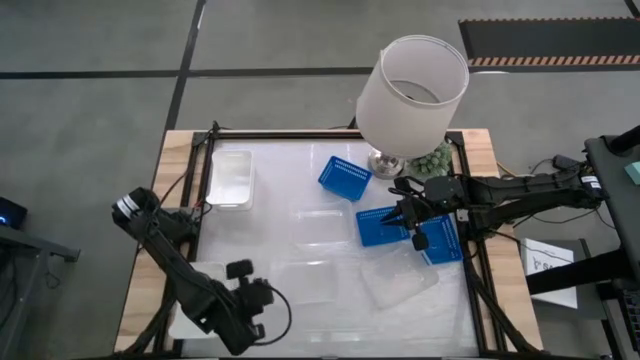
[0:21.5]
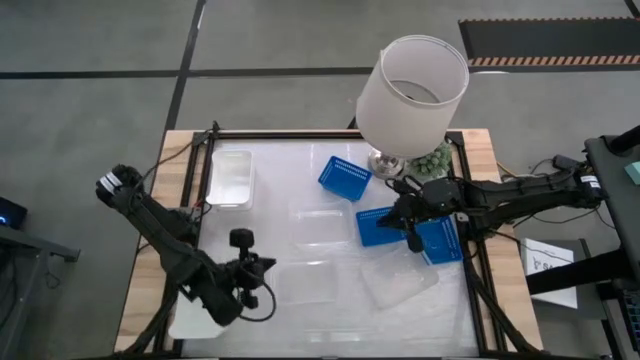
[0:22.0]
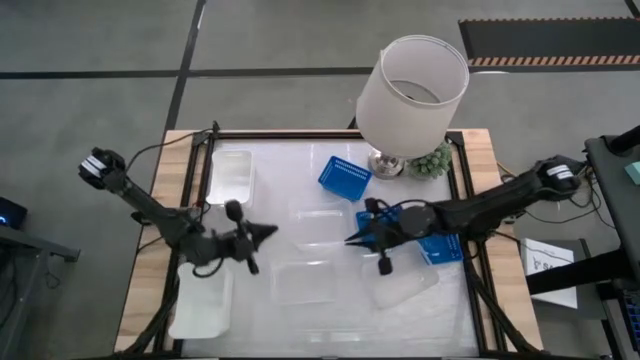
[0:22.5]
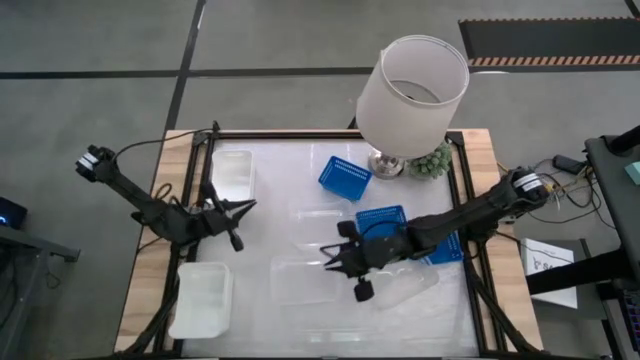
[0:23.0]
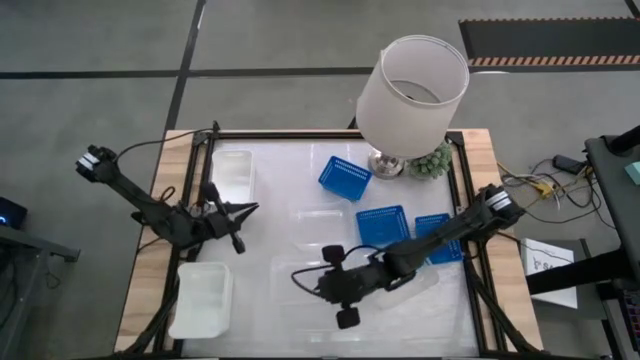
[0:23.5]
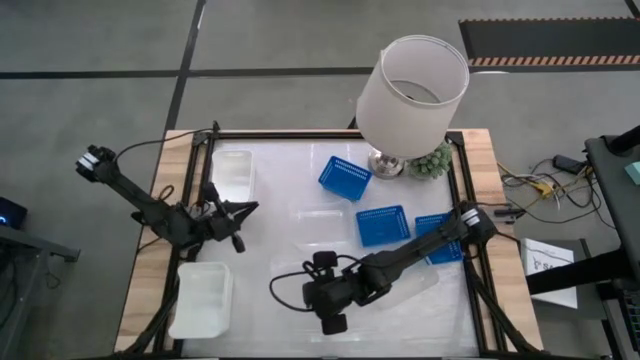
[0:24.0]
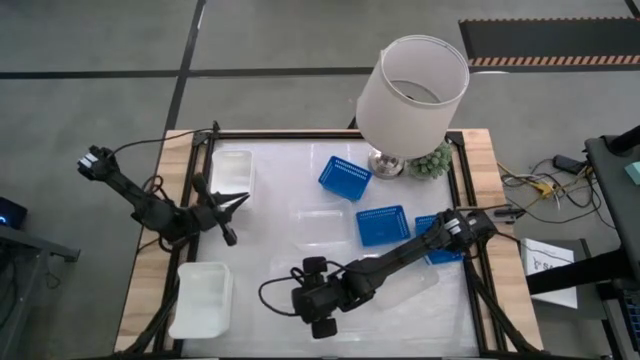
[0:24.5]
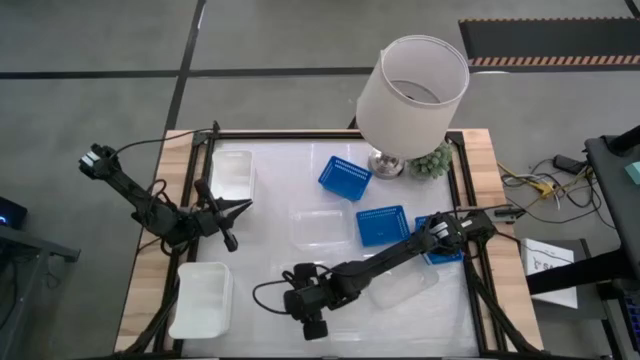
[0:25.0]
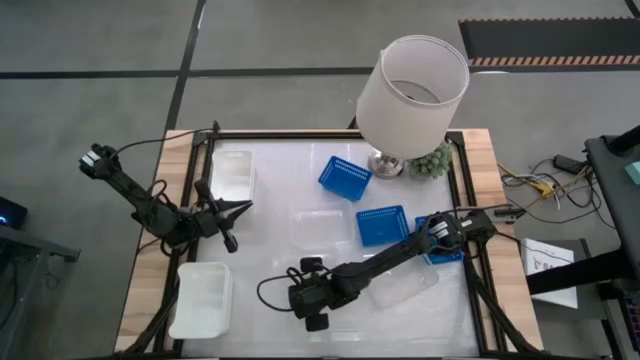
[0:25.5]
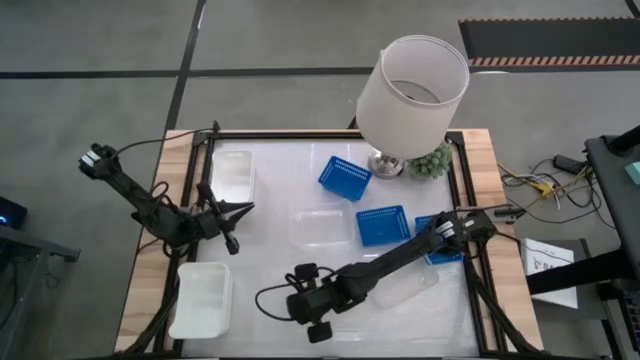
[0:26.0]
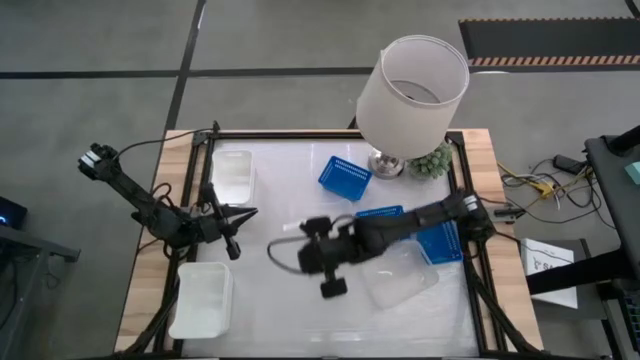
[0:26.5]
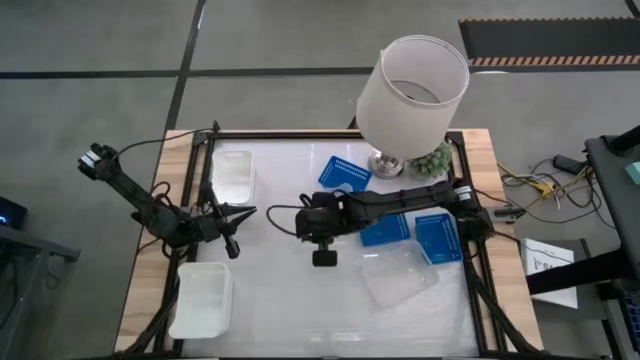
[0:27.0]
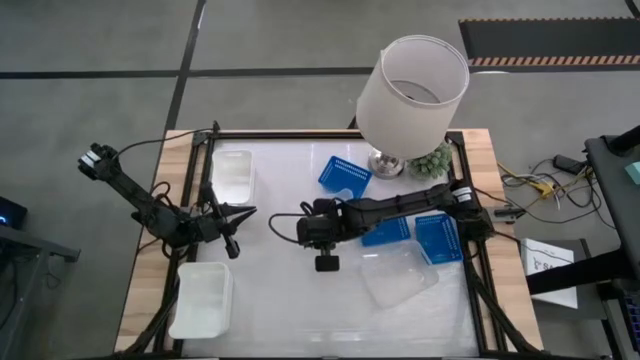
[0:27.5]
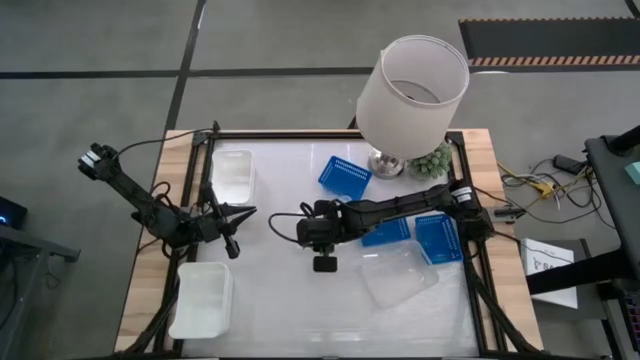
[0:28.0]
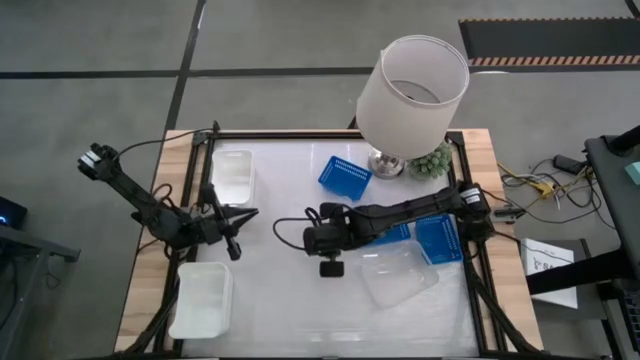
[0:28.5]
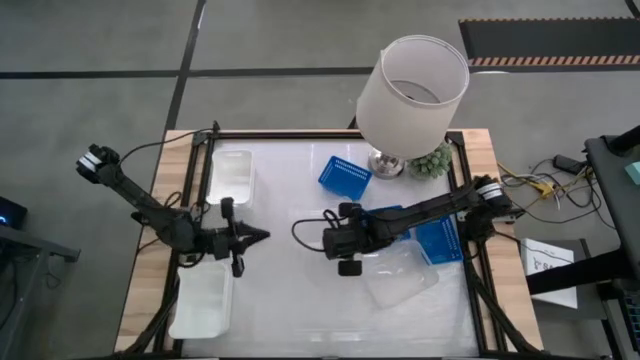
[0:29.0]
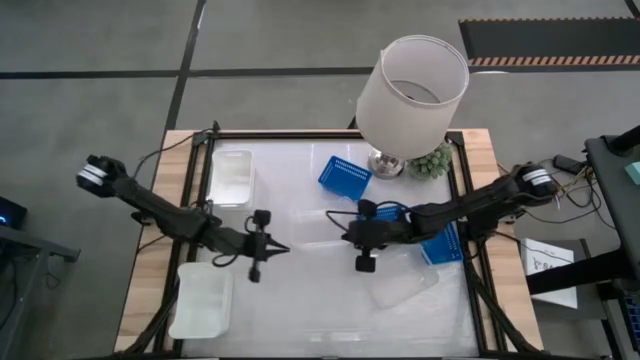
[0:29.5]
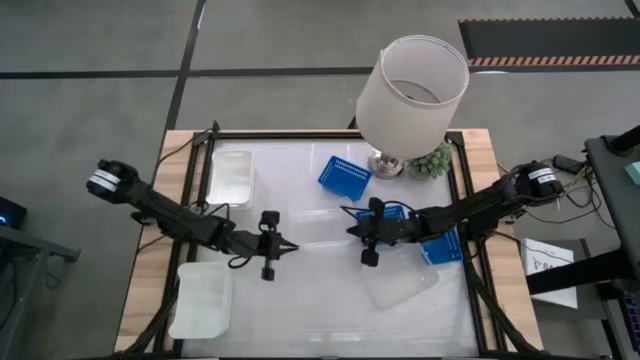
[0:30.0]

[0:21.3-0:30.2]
Stack the bottom left transparent bin on top of the top transparent bin

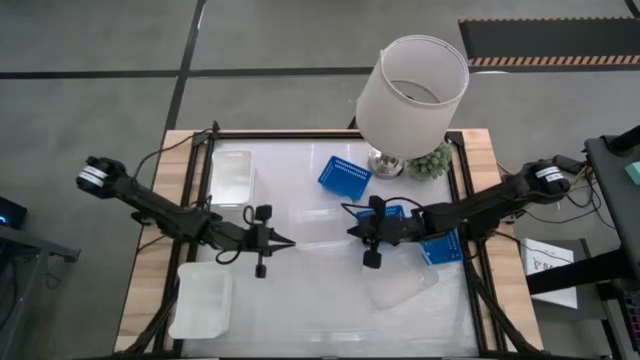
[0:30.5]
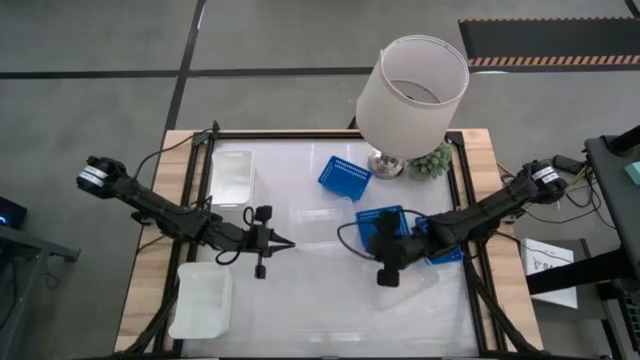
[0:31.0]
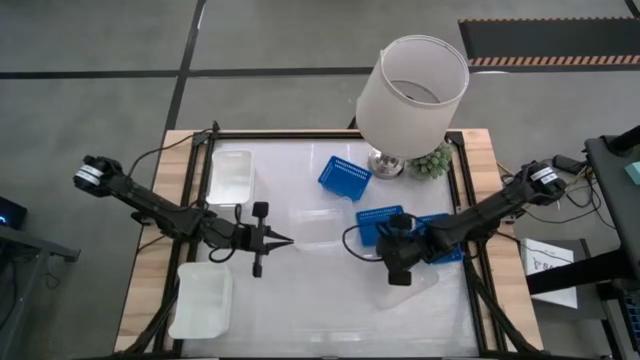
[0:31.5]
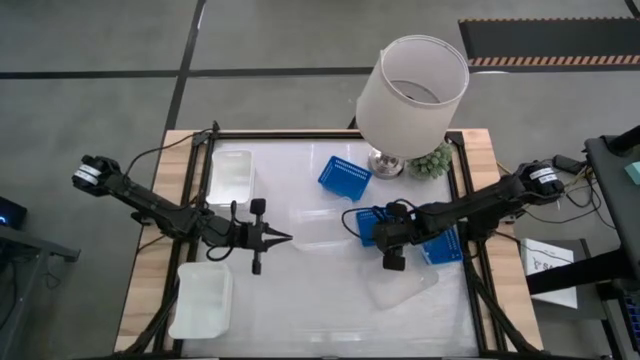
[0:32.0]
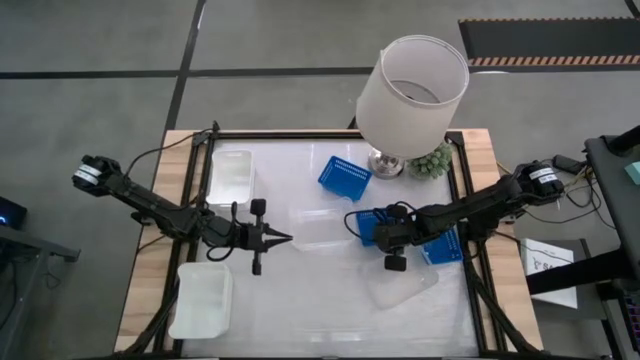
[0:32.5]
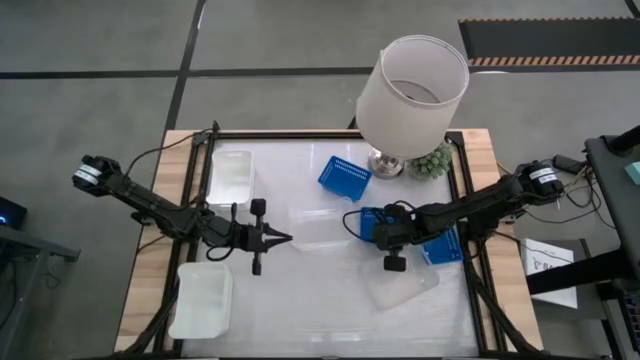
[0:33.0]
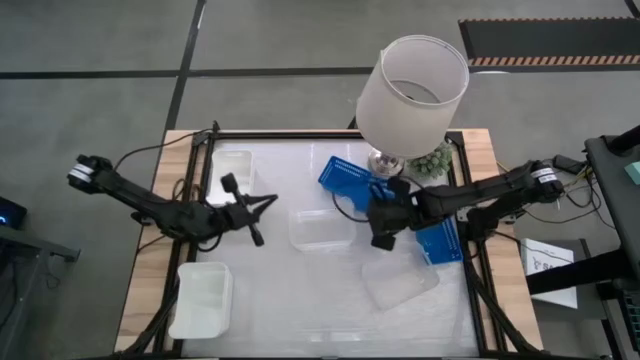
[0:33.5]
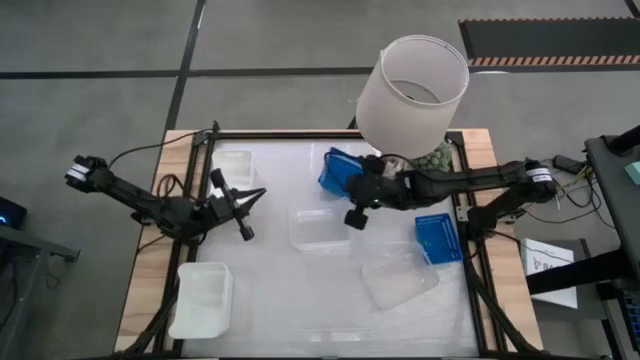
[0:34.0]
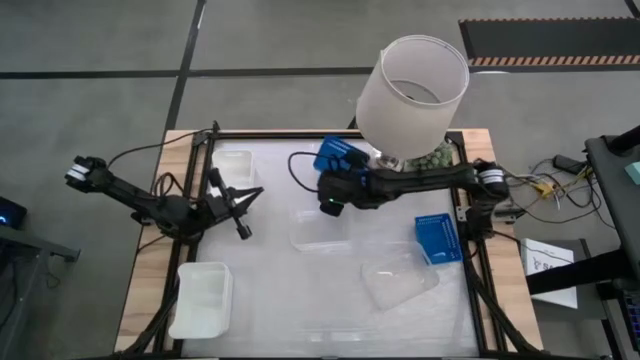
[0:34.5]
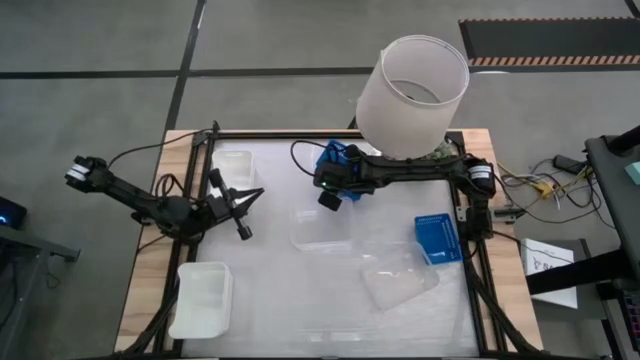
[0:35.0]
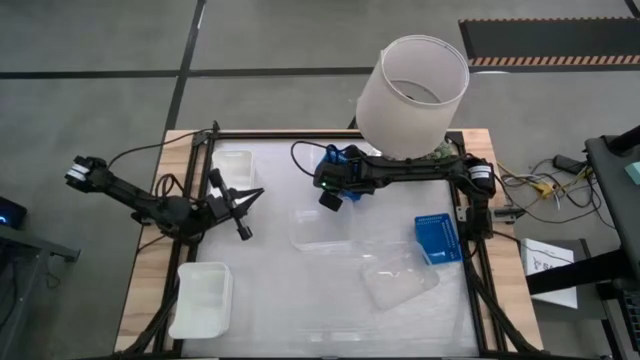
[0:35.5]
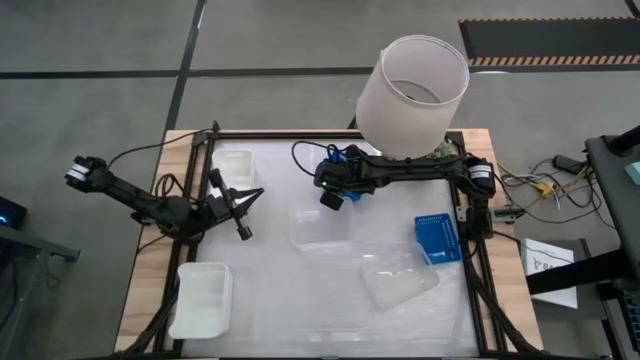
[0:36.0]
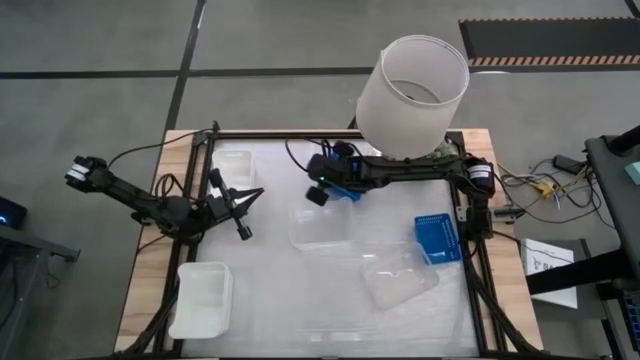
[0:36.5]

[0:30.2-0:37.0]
Stack the middle blue bin on top of the top blue bin

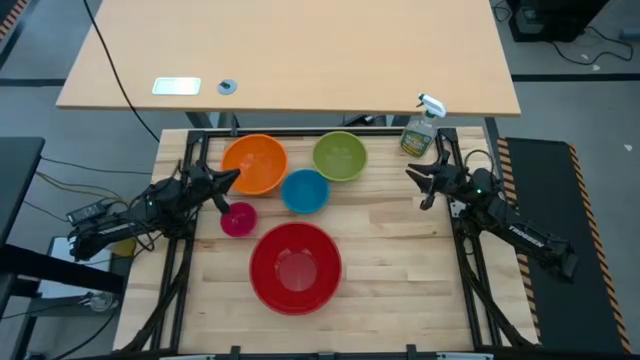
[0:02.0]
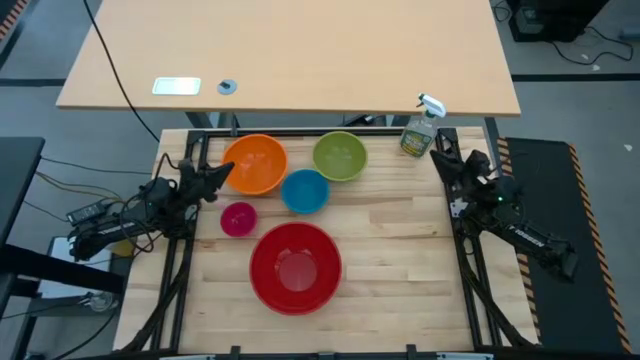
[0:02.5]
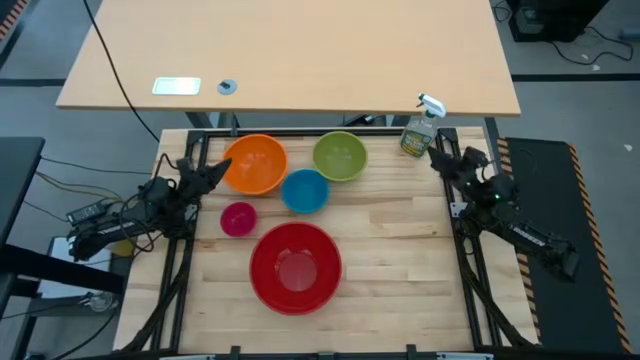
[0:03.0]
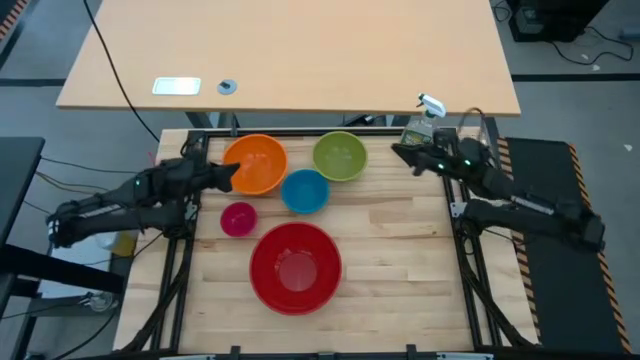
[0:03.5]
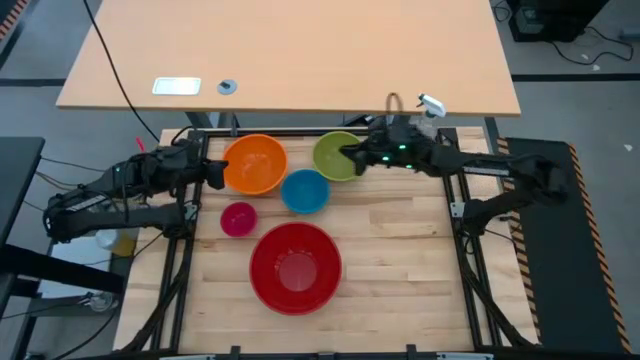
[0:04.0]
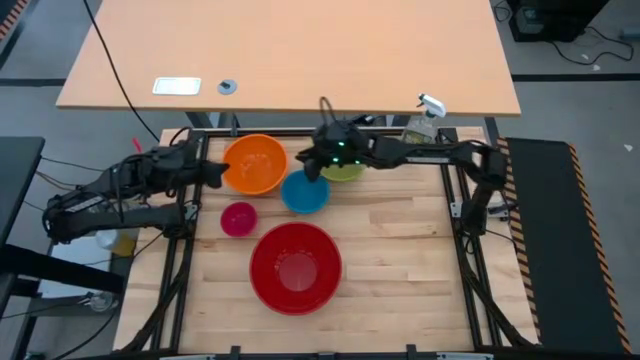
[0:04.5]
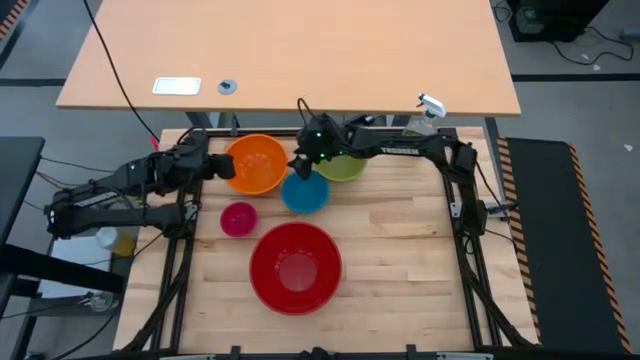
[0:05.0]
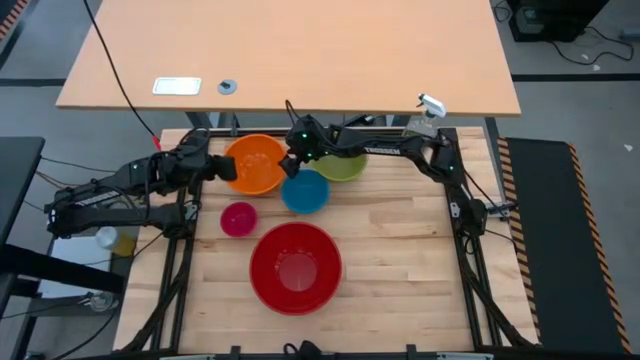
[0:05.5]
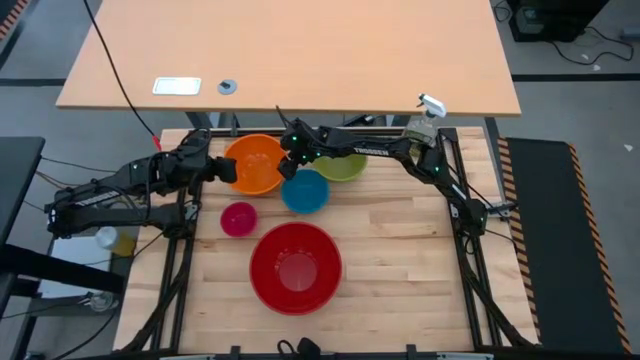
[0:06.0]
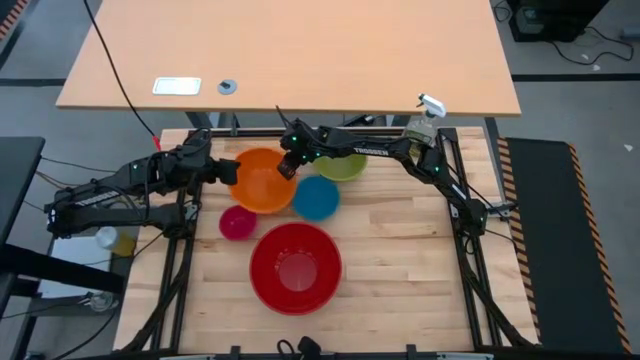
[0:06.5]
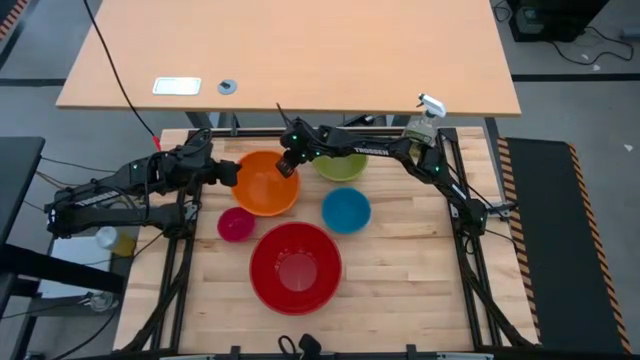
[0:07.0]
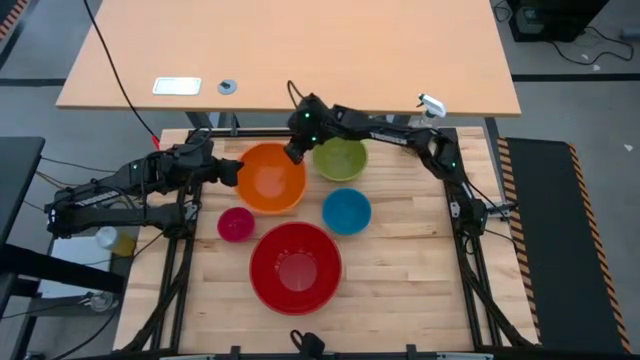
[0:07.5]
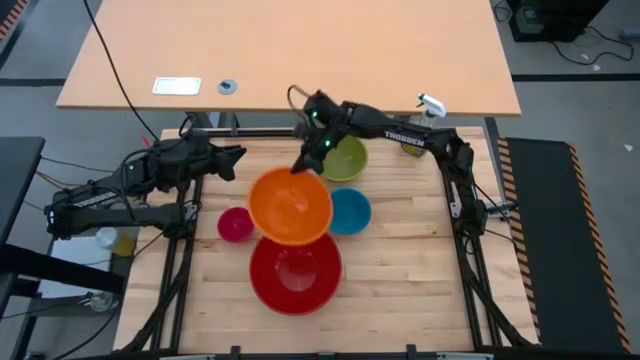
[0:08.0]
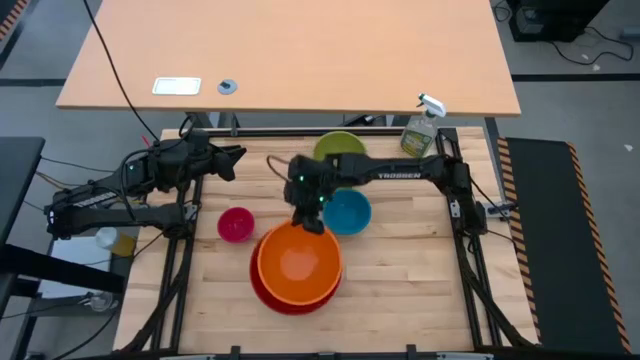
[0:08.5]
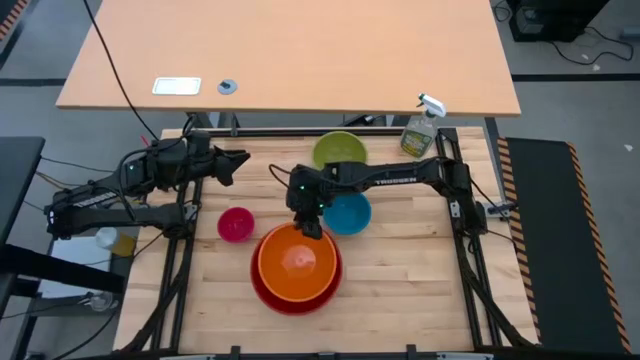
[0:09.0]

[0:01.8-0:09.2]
Stack the orange bowl on top of the red bowl
